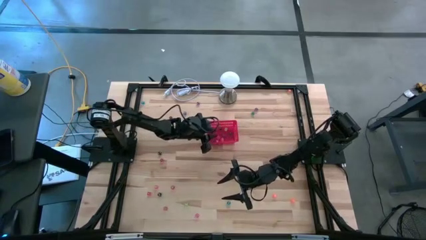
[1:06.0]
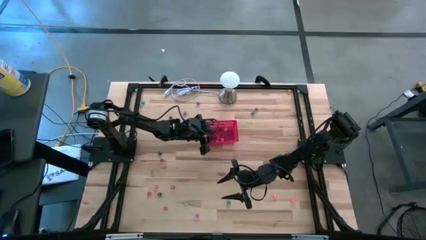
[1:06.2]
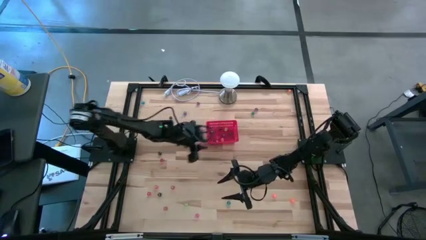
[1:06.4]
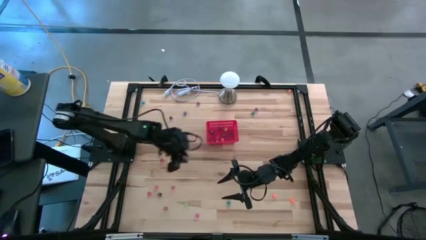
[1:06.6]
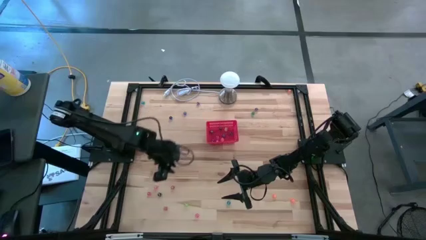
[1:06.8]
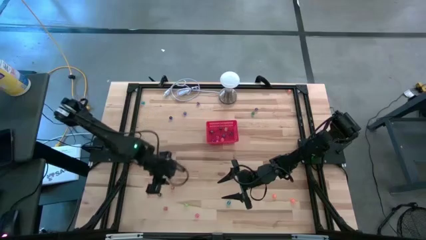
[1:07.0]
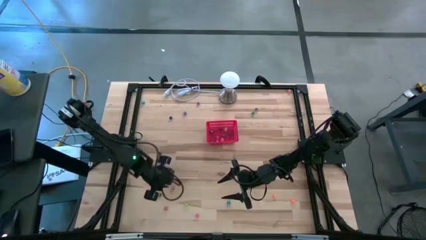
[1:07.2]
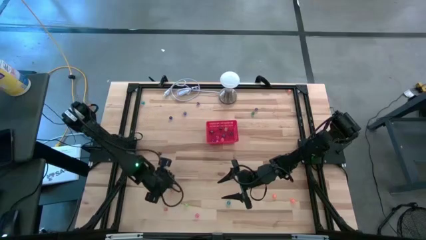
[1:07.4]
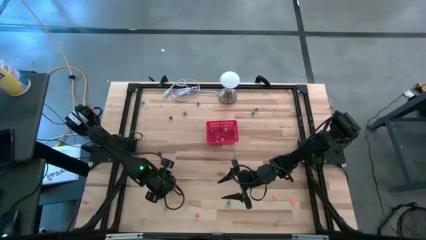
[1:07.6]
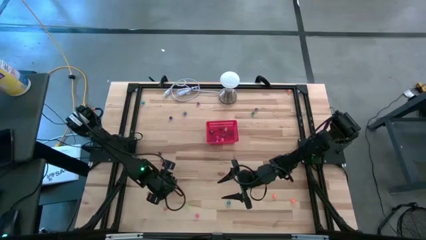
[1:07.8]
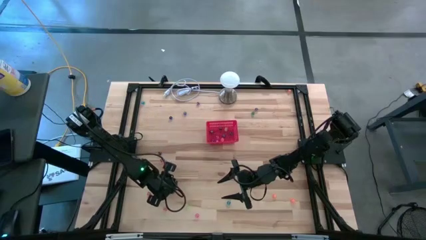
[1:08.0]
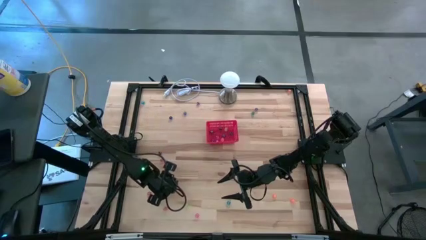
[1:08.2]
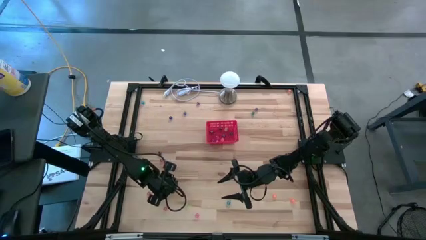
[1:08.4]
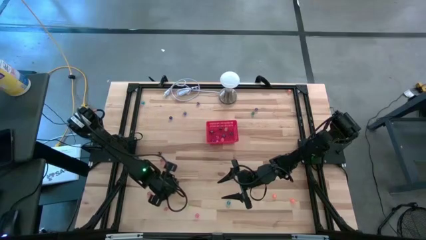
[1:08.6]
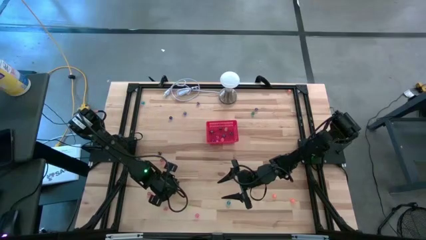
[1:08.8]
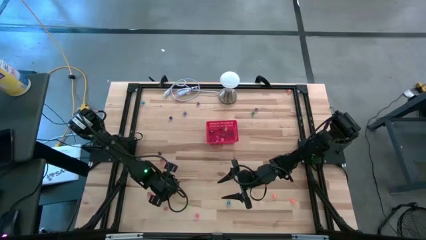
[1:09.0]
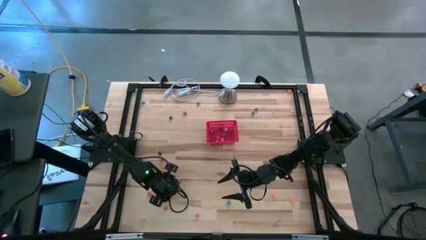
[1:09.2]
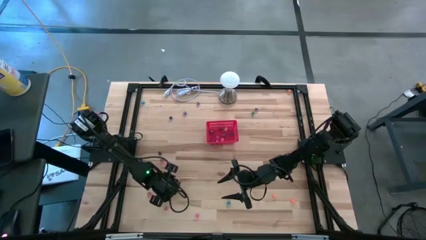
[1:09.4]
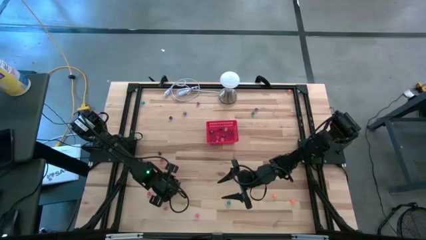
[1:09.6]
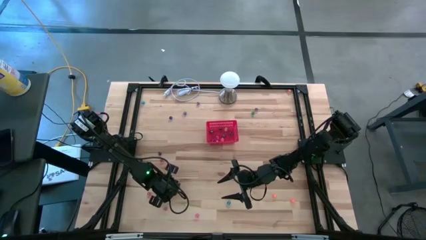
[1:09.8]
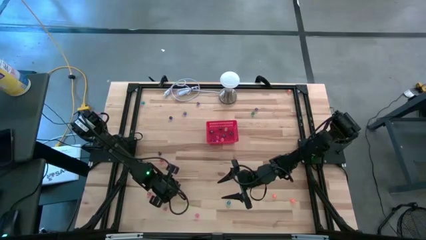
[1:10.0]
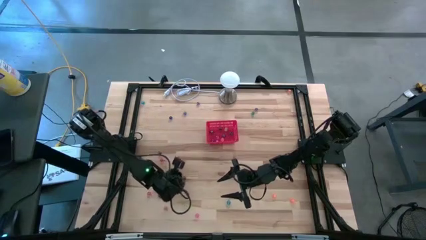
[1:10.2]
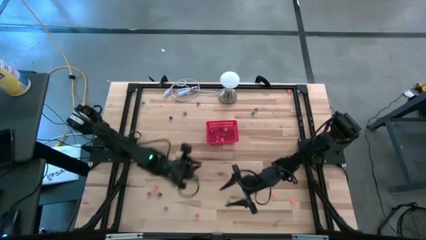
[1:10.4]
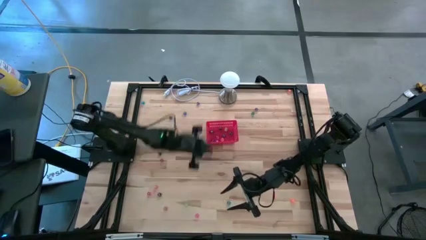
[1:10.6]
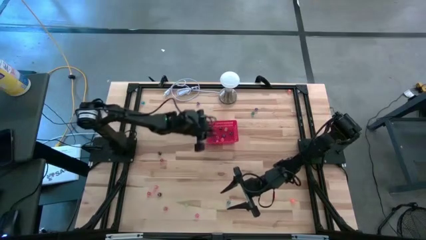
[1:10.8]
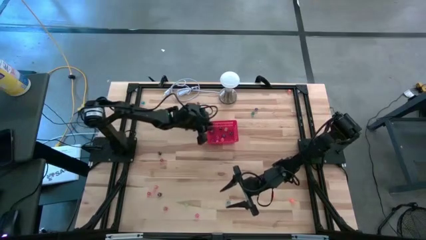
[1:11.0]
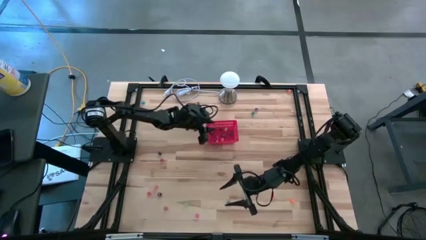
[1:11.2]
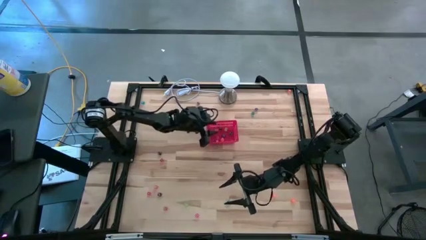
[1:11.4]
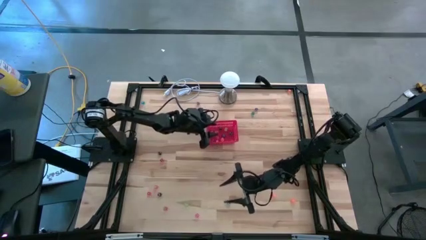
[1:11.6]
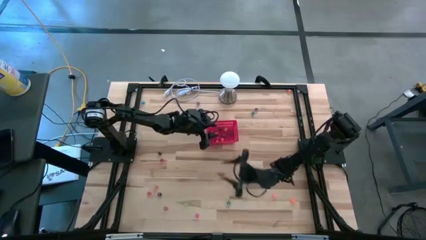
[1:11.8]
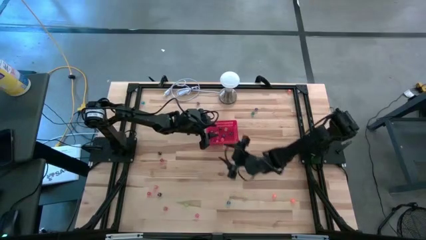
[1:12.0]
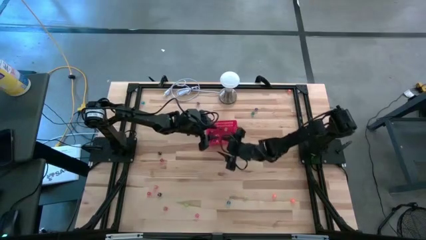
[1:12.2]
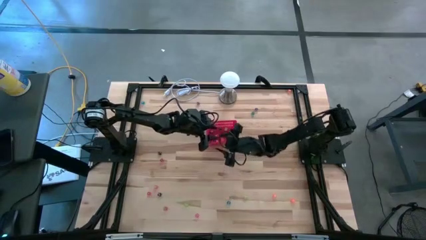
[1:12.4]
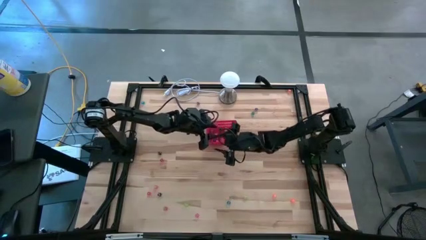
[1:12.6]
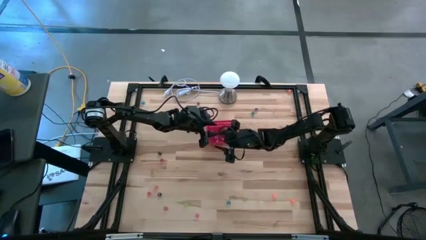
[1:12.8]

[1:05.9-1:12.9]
Task: Pick & Place Dice
Put the middle red dice into the bin

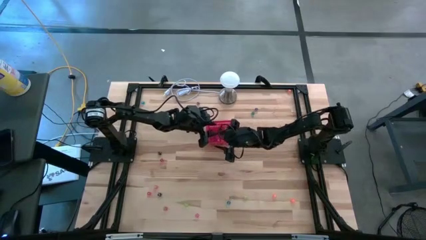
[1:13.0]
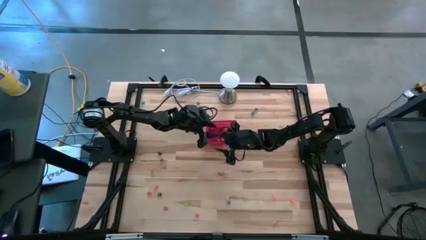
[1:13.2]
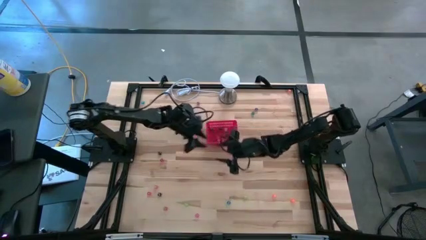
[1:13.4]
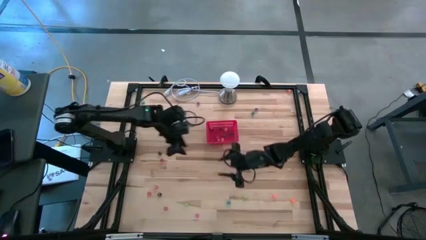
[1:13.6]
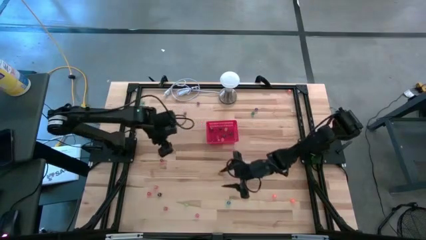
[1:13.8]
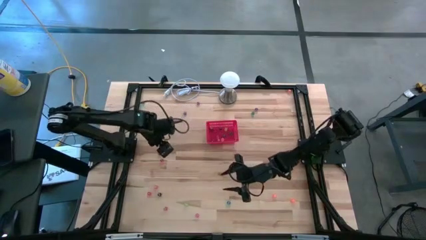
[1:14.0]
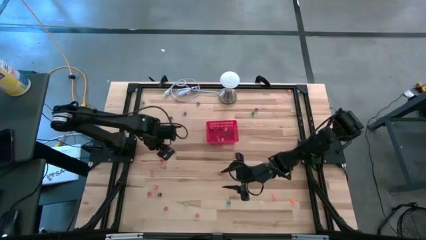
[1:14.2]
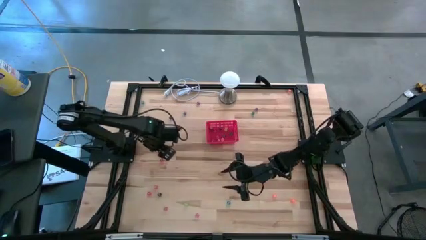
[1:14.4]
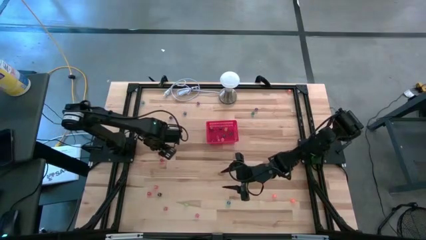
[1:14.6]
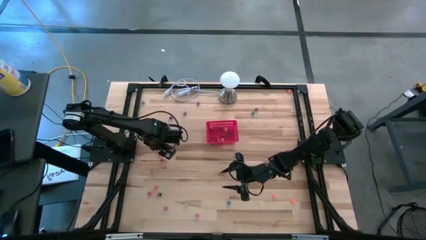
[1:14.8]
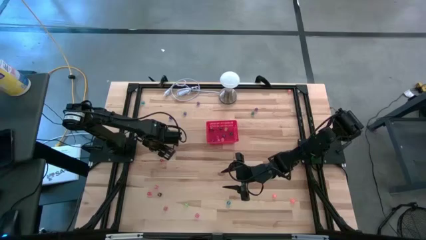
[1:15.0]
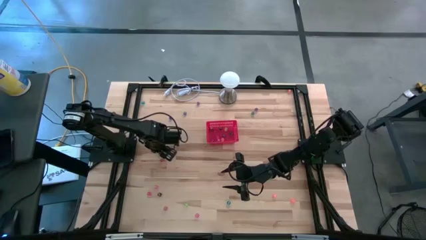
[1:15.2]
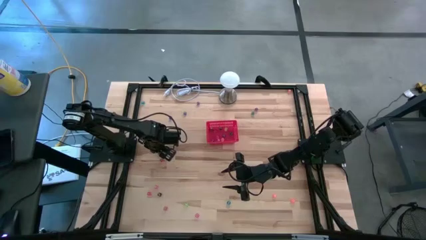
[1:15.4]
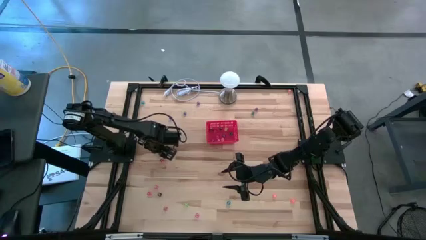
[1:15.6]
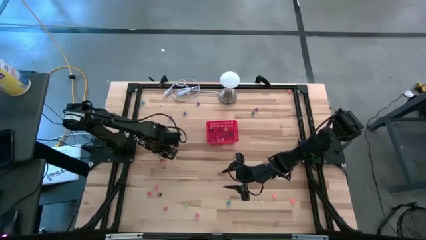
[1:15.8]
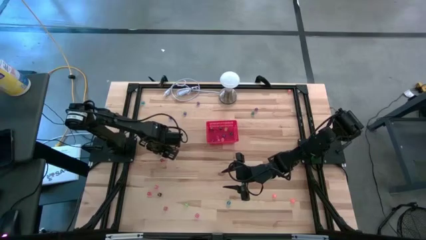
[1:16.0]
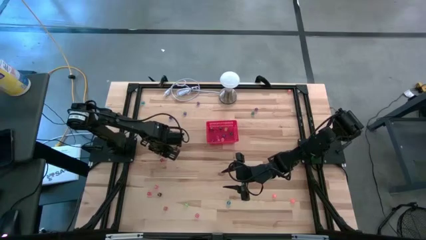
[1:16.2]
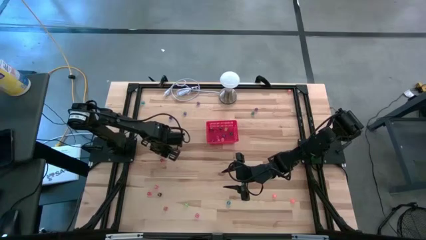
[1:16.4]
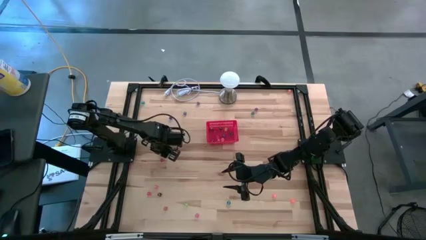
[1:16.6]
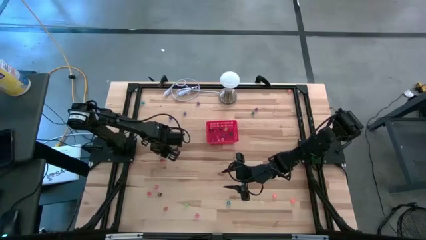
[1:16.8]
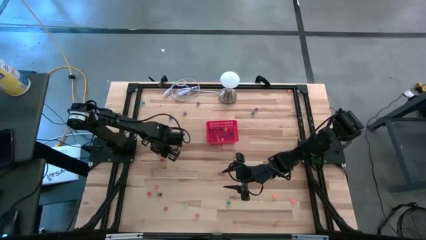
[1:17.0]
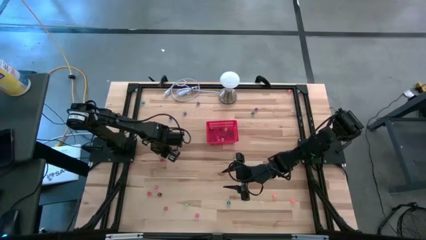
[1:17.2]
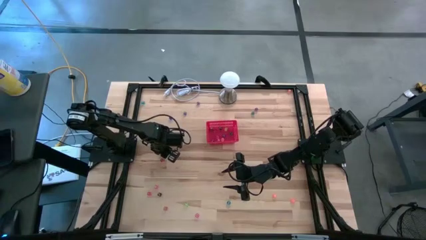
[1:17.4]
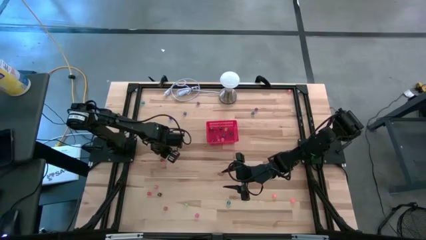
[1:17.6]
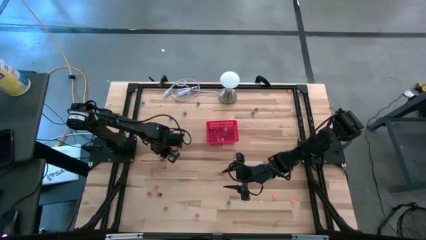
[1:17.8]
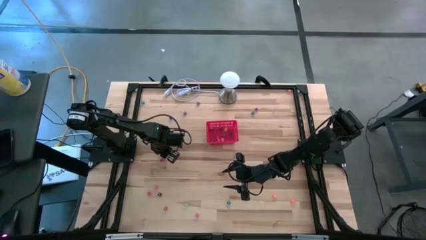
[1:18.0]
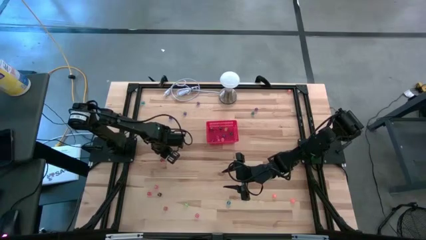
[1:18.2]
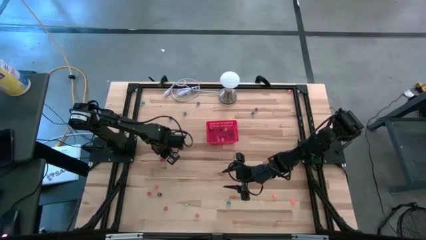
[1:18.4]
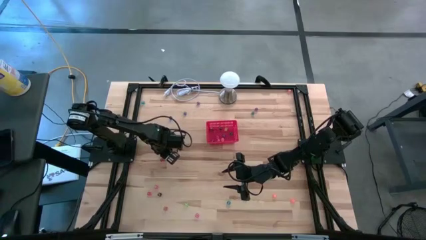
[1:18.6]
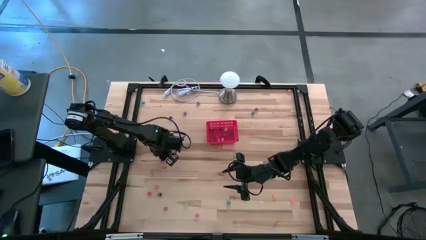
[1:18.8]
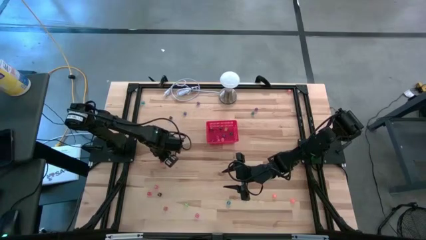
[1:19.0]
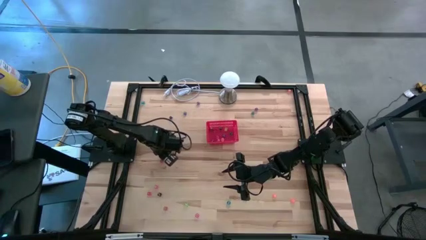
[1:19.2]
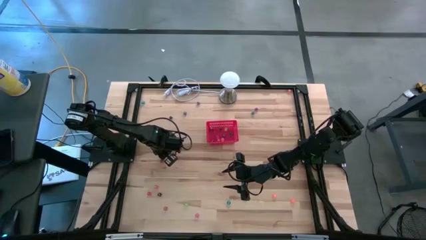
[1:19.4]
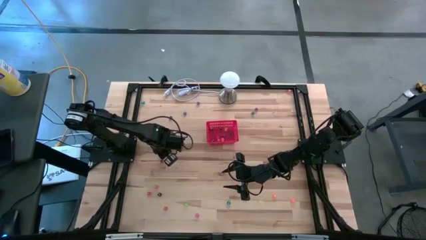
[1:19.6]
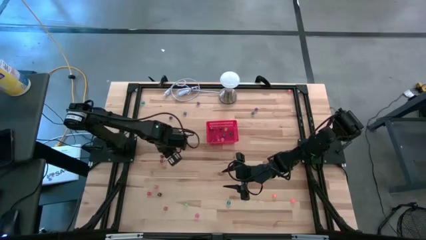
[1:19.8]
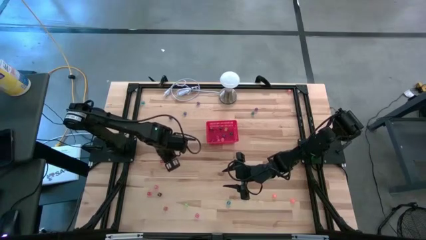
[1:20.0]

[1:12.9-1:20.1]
Put the top black dice into the bin

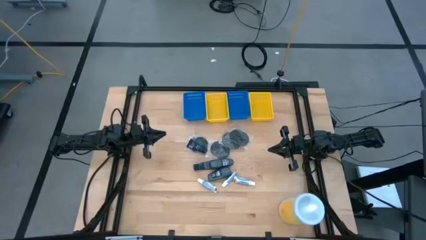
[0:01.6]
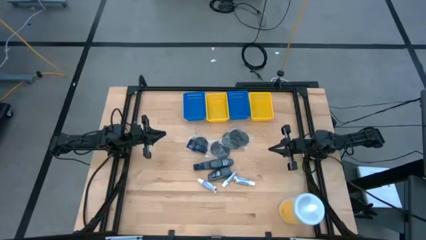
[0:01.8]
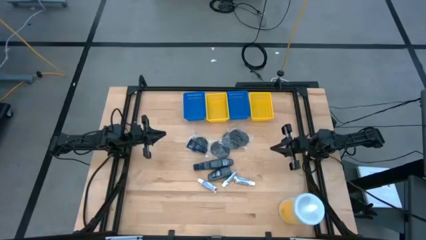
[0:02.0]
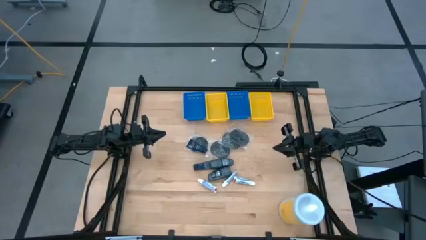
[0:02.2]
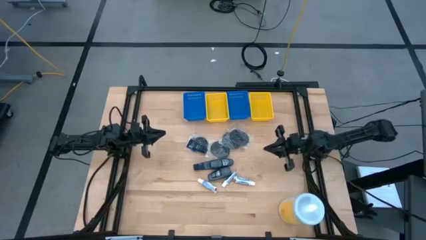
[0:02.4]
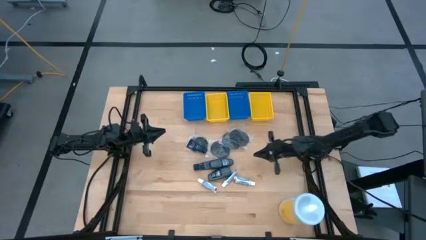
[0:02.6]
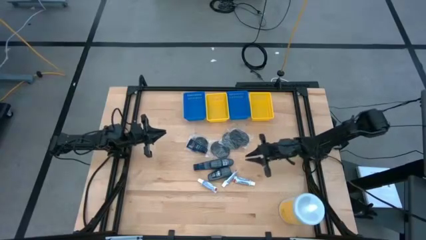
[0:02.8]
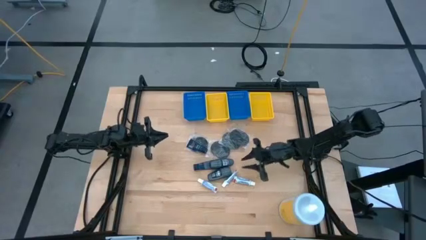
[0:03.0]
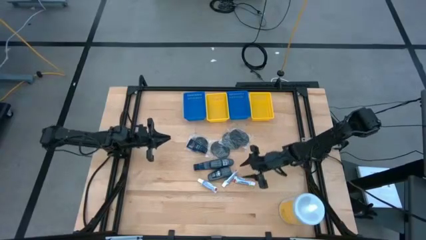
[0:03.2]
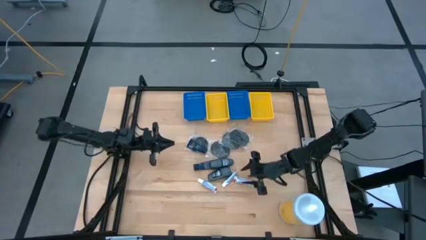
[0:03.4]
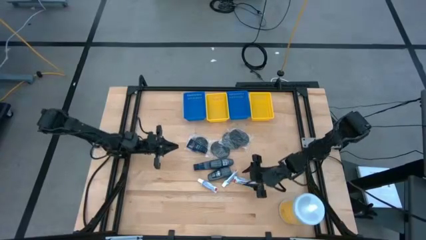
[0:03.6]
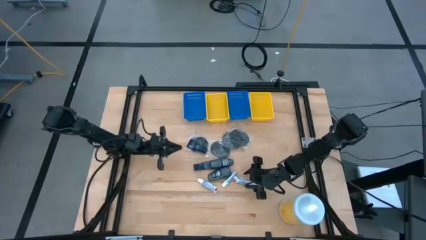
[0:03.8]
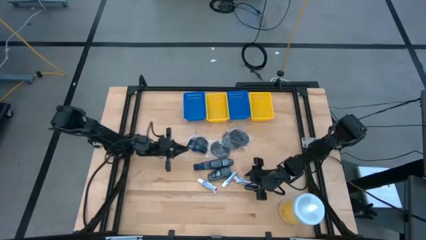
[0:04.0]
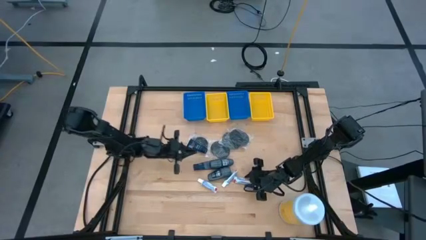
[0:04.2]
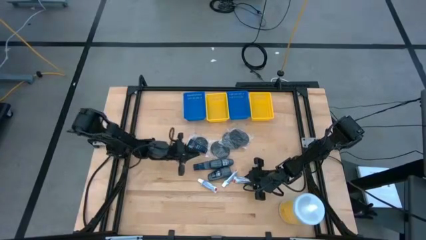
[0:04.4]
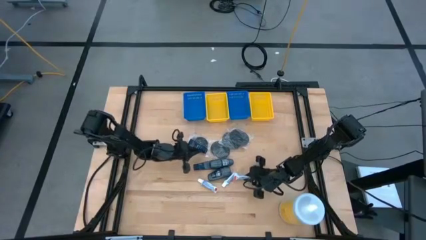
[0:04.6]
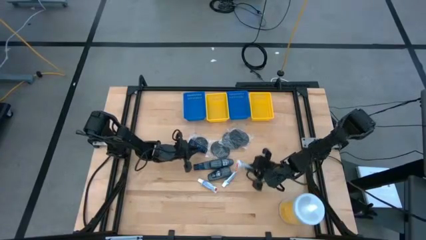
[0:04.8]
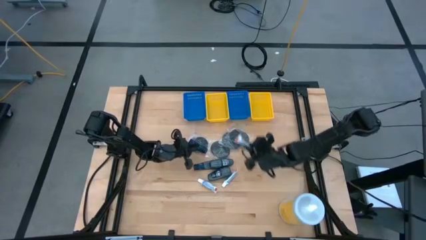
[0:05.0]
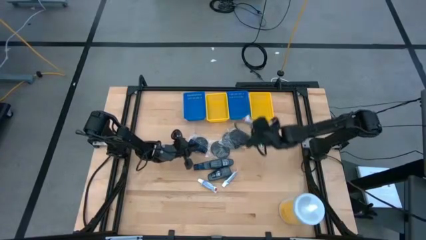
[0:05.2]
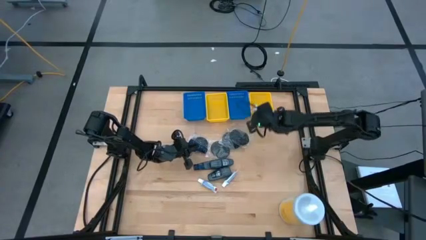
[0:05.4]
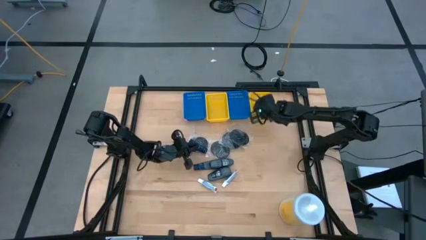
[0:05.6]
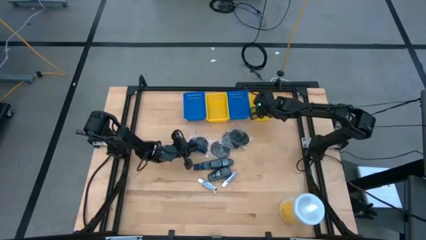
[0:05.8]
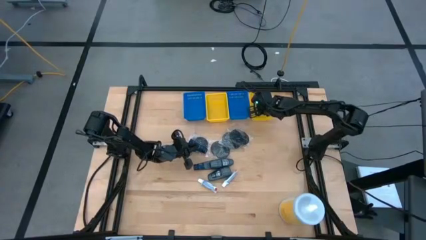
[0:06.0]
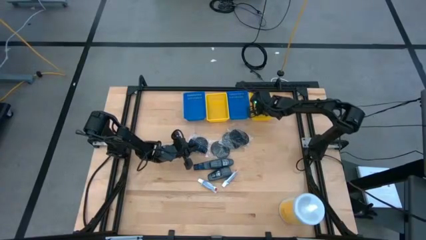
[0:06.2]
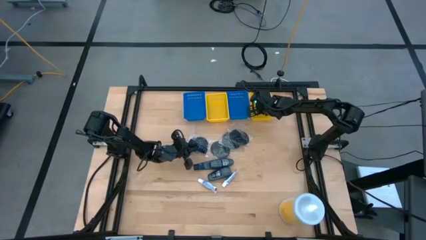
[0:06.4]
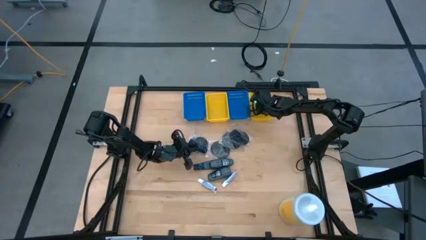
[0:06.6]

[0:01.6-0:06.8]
Task: Pick & Place Travel size toiletries
Put the white toothpaste into the right yellow bin
